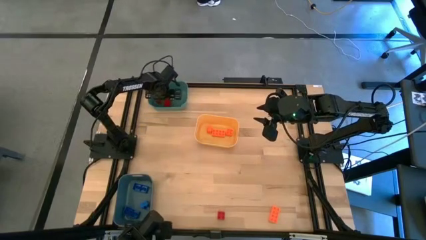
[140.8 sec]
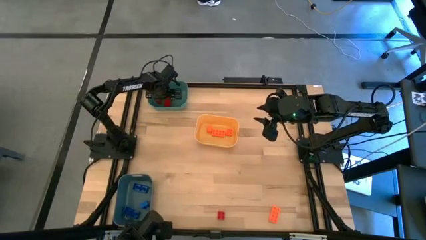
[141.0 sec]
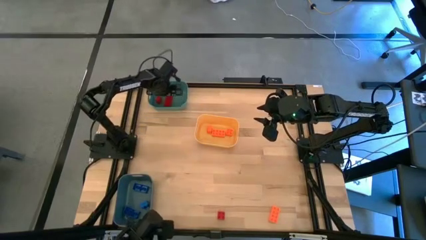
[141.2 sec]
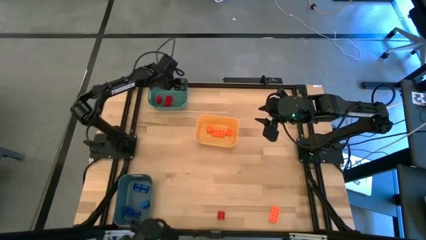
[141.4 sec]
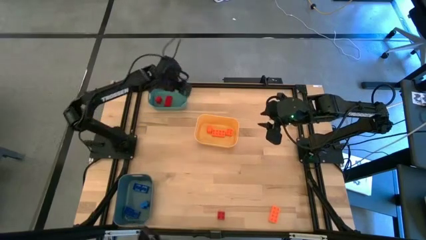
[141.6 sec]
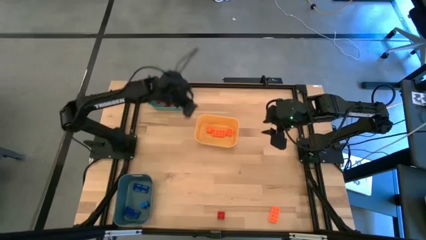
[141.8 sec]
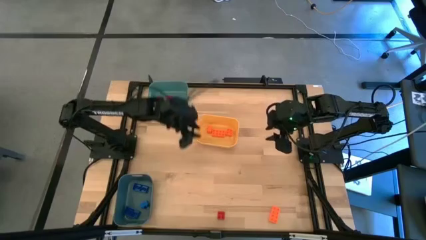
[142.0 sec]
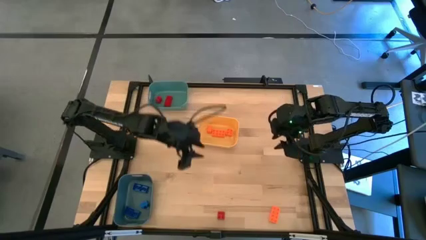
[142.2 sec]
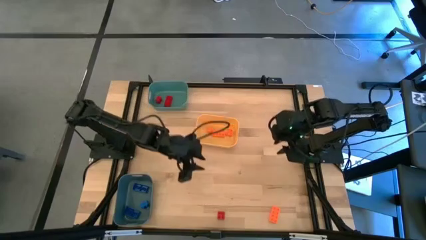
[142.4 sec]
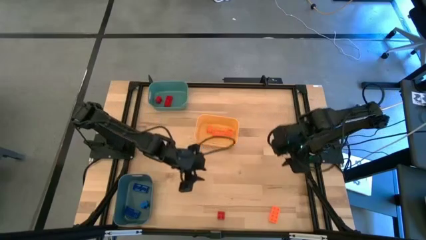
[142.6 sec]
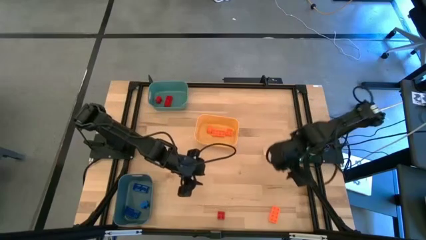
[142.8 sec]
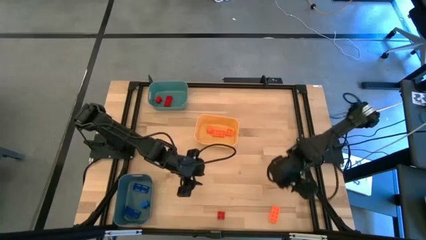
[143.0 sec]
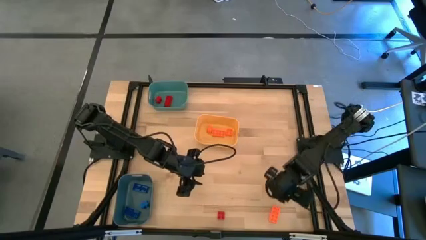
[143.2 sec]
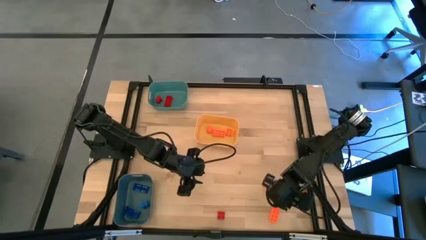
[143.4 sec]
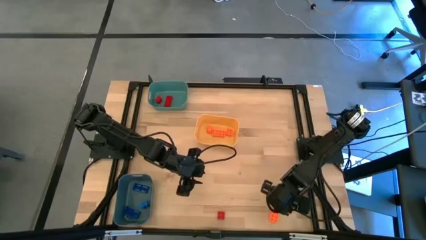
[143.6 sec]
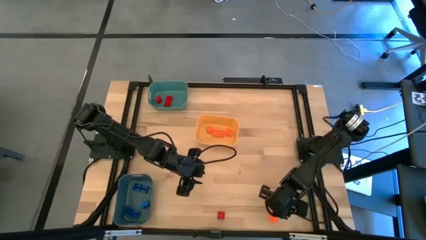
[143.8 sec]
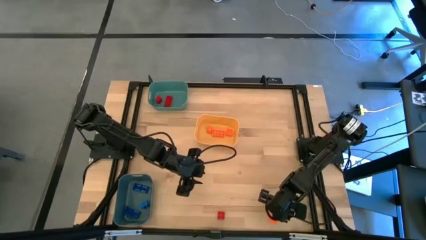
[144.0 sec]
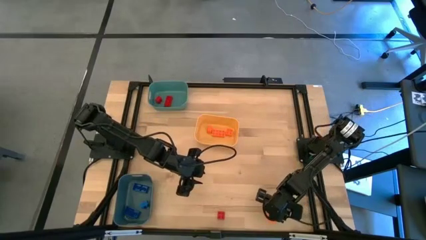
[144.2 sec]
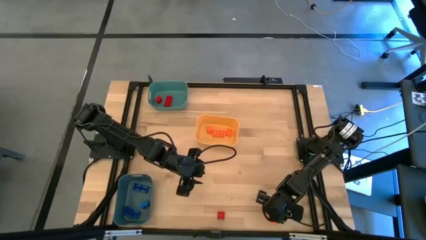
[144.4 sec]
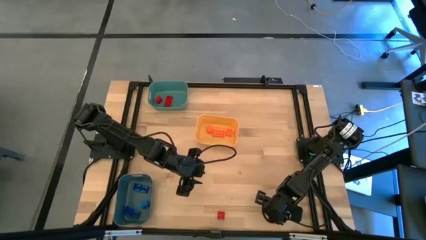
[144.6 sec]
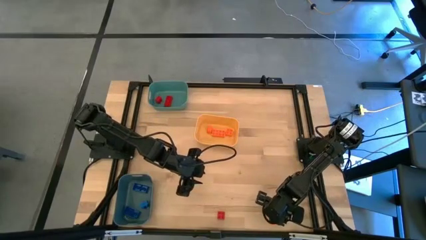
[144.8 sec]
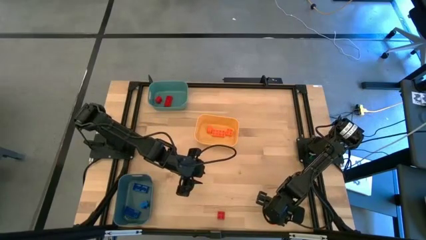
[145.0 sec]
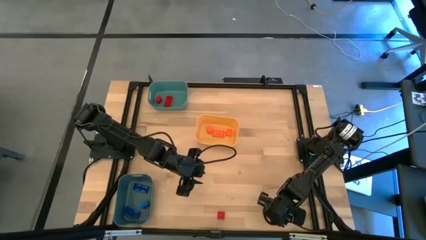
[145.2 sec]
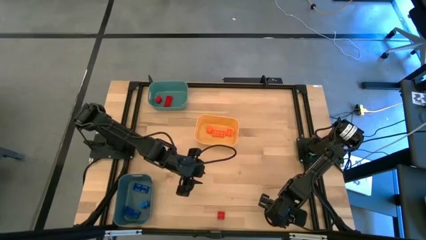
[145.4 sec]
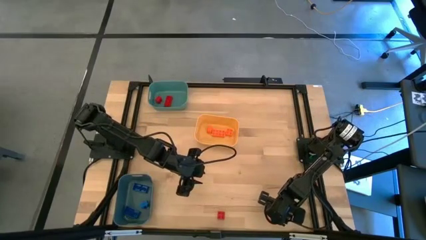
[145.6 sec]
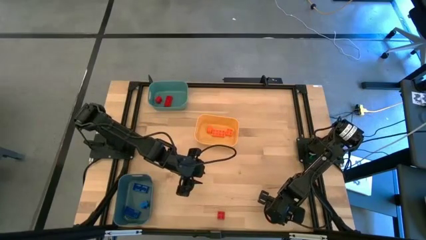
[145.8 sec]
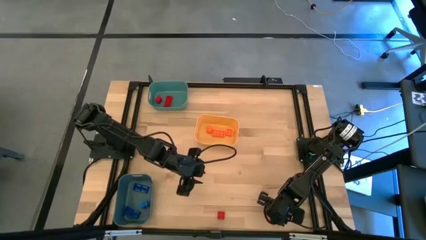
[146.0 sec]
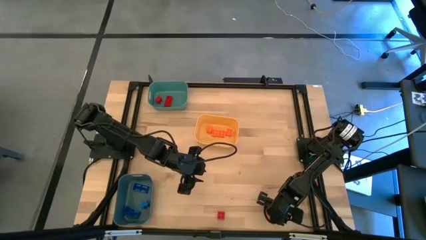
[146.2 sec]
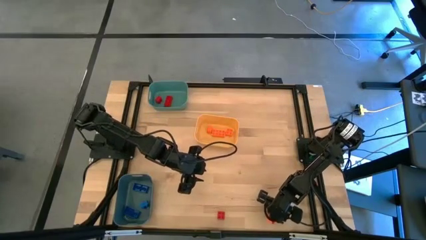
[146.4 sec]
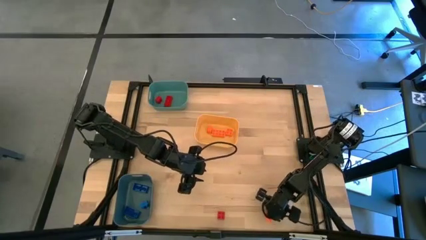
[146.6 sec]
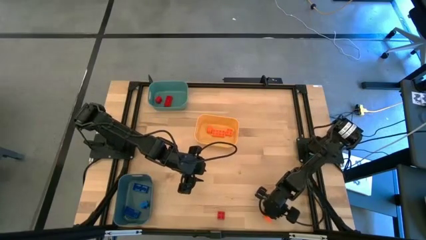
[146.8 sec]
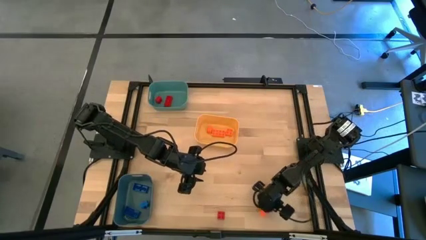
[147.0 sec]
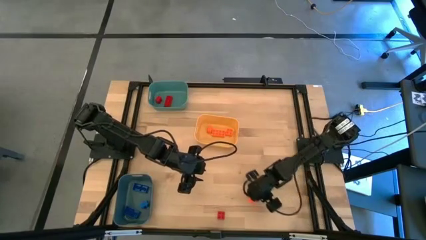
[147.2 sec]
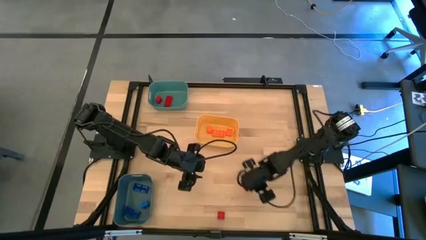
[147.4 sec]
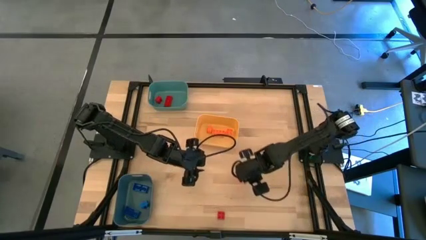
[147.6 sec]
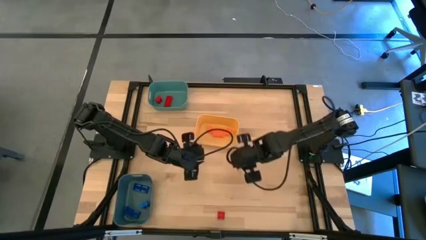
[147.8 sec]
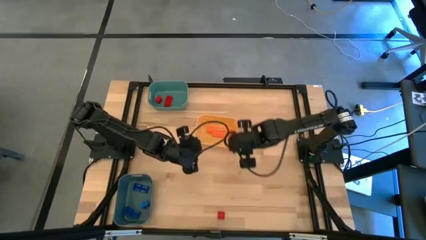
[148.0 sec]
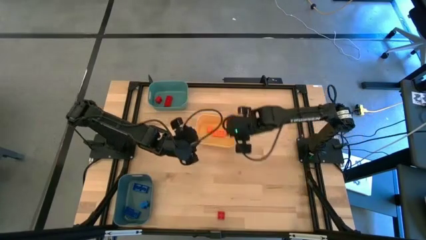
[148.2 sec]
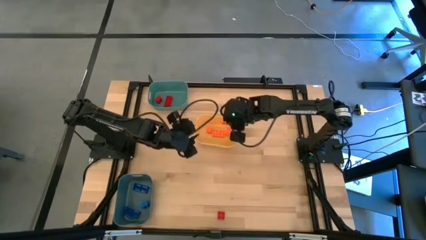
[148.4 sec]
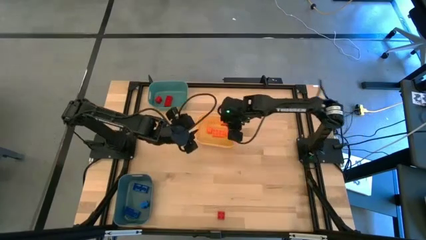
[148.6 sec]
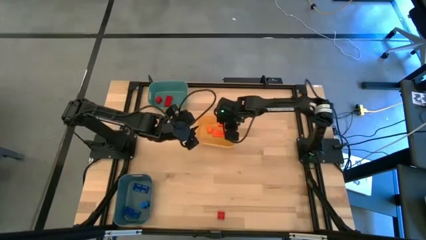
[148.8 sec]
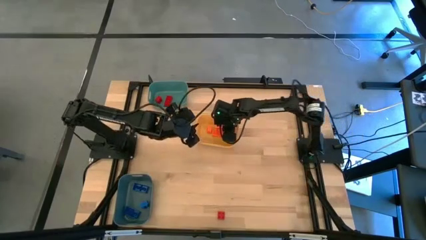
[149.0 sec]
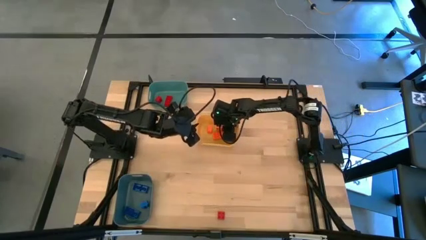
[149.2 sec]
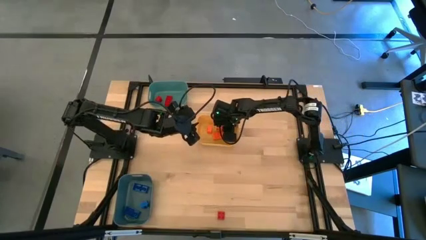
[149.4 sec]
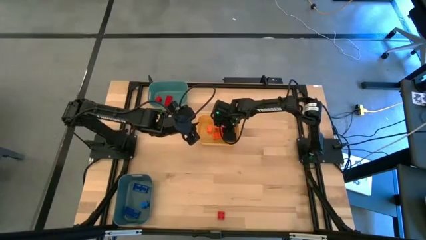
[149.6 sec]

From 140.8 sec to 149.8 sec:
Task: Sort & place blocks by color
Put the orange 8 stud game piece into the yellow bin

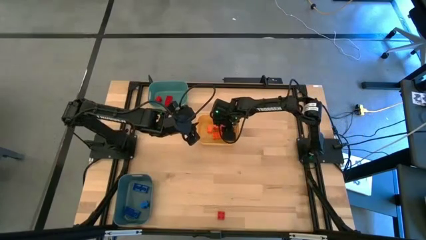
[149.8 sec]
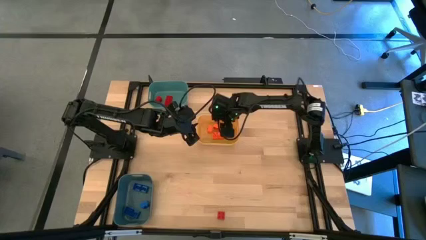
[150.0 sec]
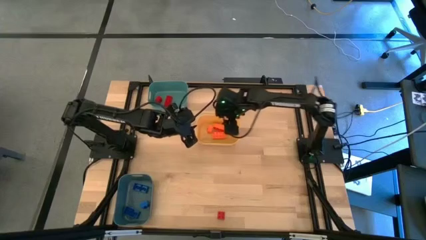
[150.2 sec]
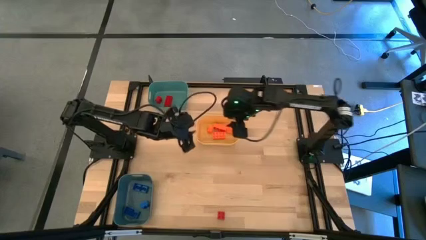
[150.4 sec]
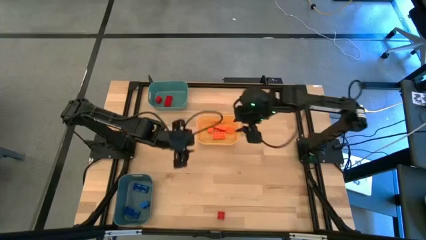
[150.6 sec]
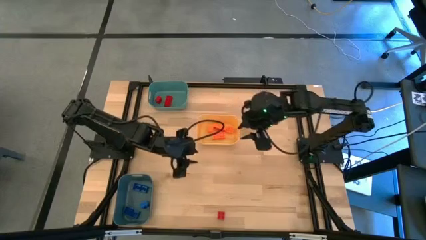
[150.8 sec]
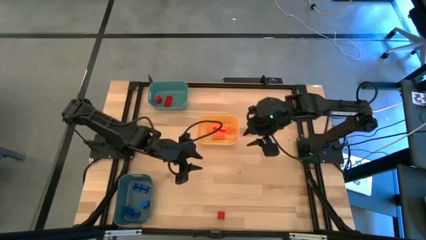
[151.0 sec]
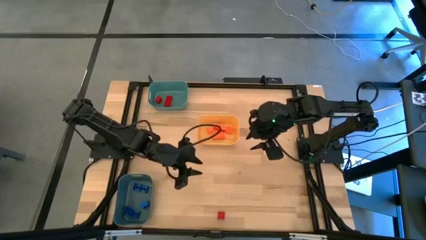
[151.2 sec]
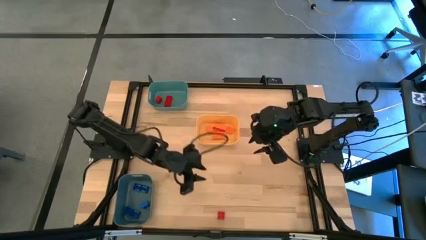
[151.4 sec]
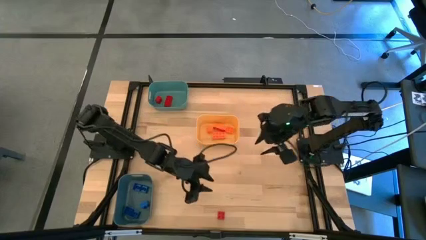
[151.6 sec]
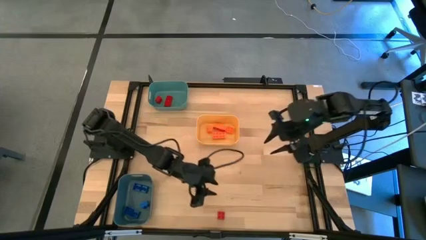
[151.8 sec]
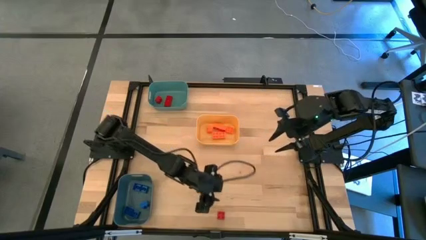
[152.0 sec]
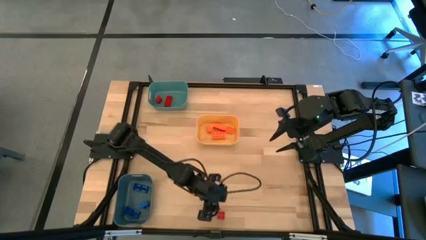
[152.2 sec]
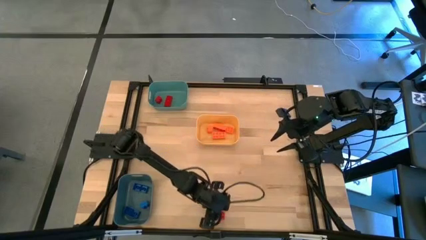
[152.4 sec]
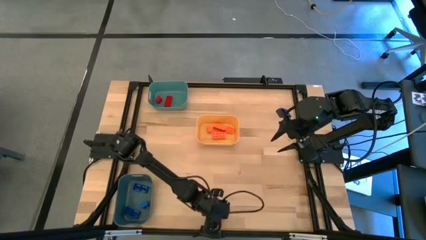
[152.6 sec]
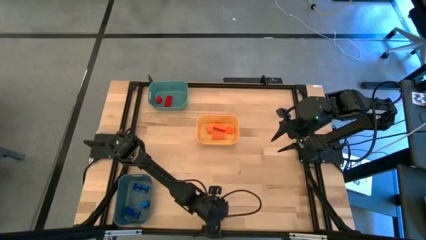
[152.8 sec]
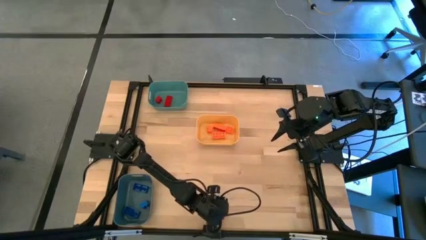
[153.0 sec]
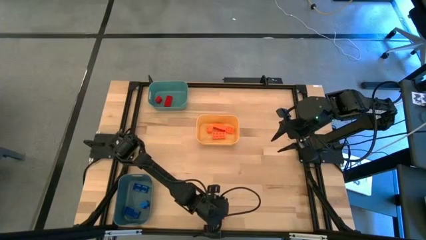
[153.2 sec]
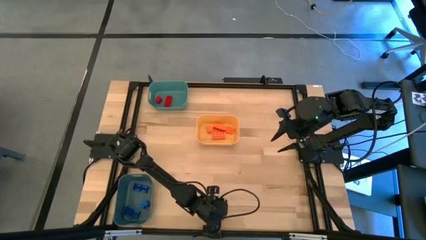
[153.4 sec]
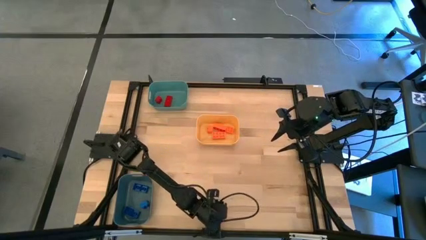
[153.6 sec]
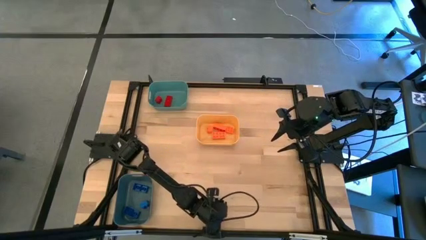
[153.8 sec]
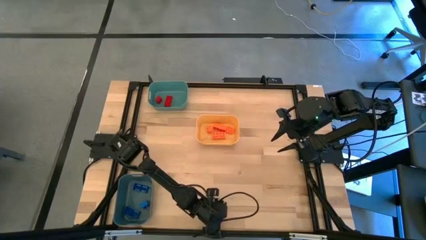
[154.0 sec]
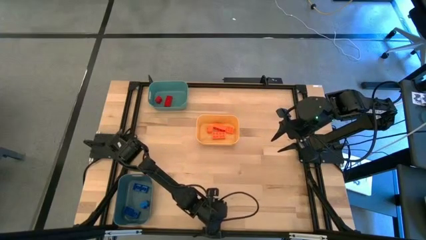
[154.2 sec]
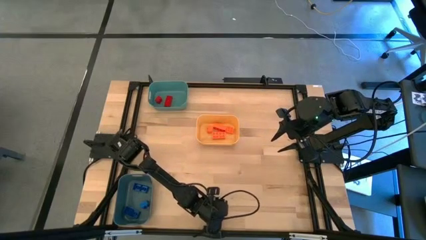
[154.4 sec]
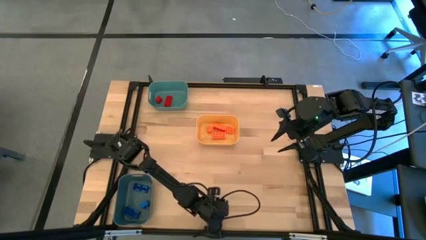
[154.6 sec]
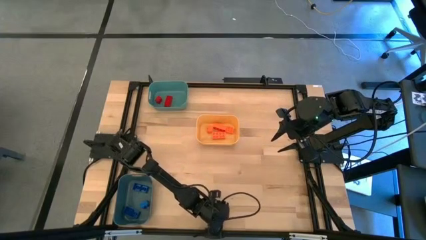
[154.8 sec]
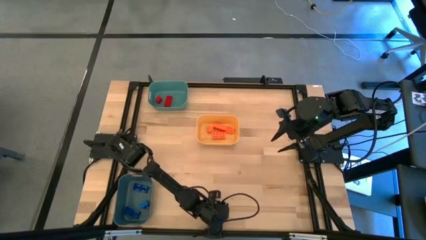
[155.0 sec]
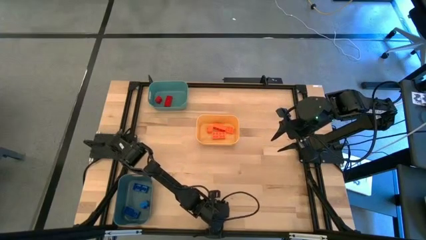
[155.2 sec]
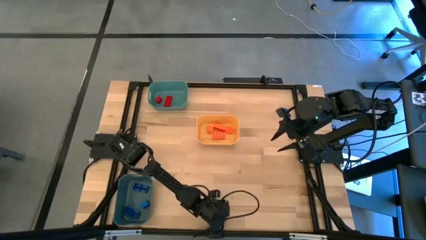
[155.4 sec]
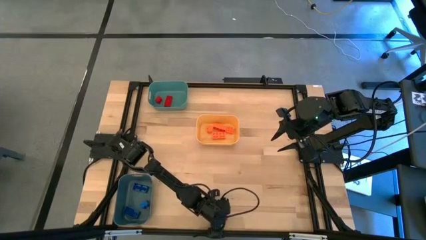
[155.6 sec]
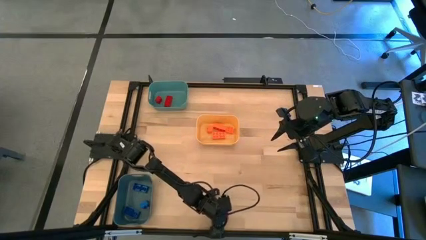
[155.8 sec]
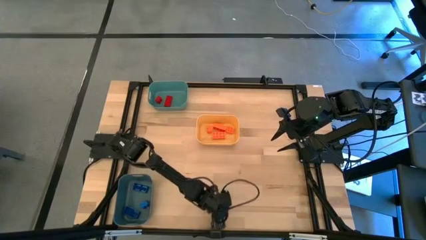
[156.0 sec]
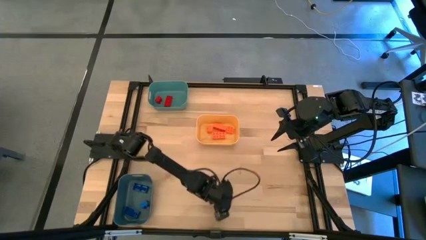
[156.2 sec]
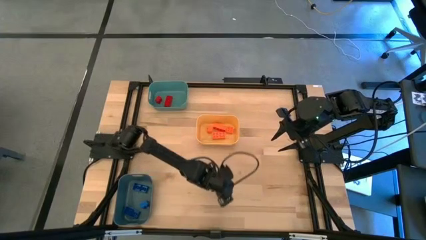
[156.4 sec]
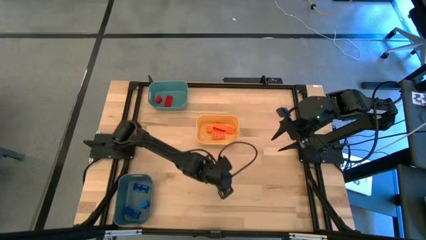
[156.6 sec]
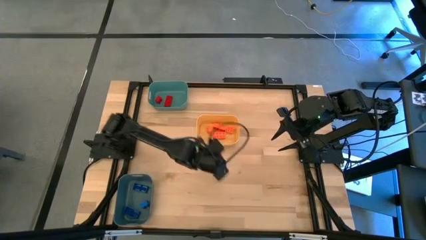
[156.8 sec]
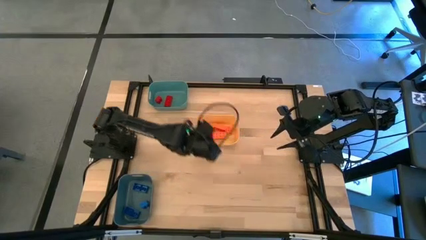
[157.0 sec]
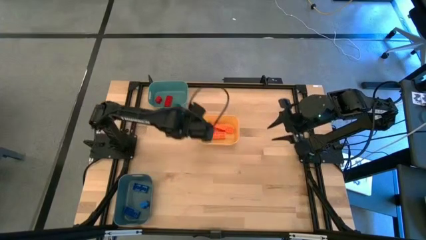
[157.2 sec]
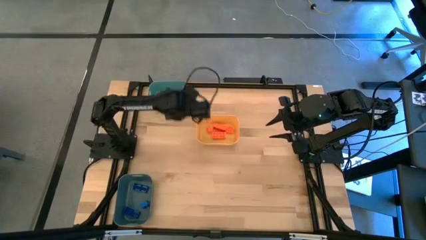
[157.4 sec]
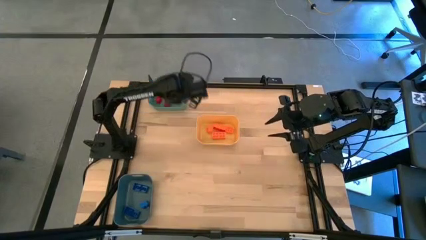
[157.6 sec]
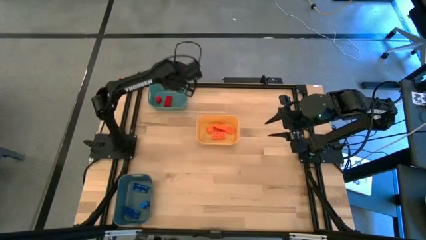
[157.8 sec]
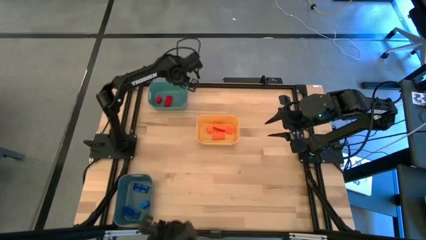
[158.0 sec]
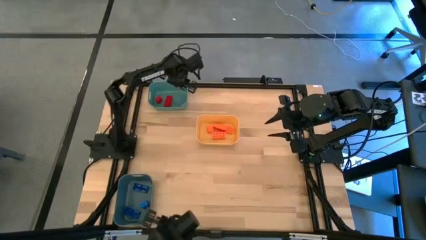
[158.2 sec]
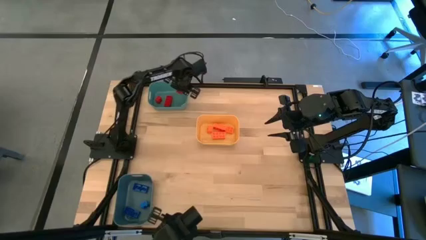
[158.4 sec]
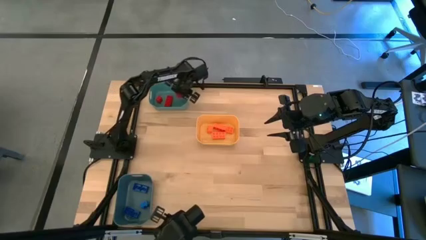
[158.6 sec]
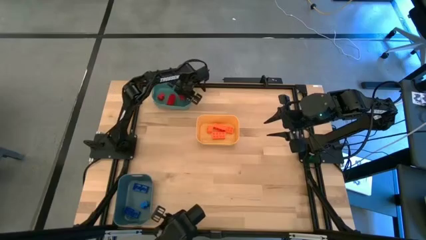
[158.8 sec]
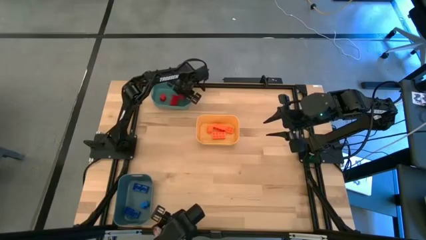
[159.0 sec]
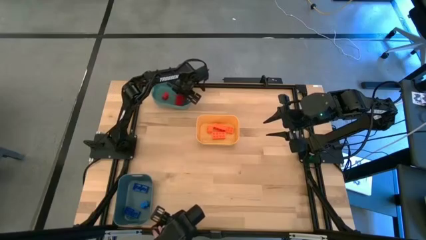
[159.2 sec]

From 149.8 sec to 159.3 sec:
Put the red 4 stud game piece into the green bin
